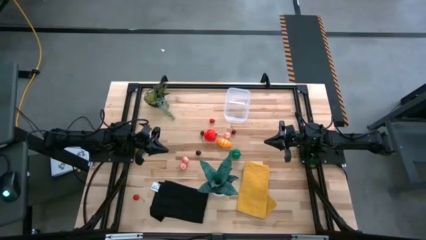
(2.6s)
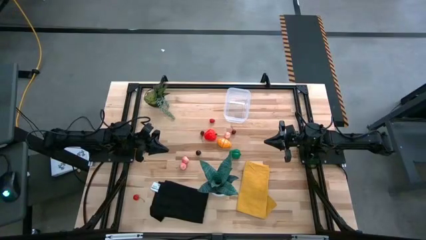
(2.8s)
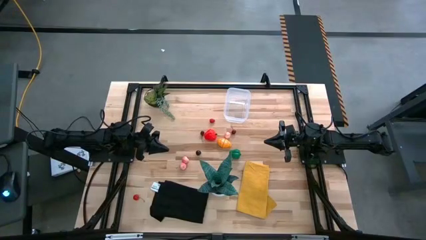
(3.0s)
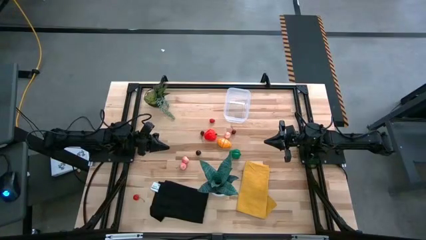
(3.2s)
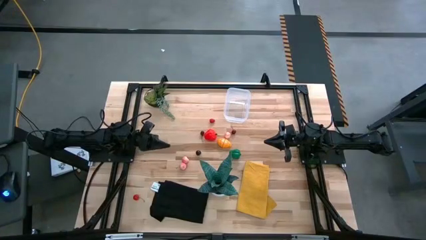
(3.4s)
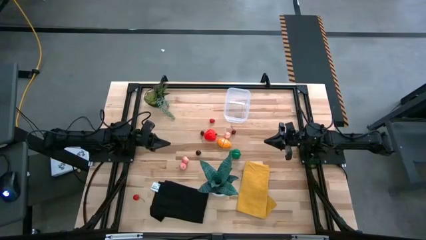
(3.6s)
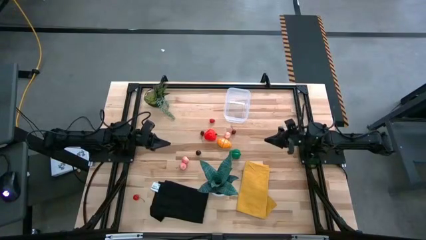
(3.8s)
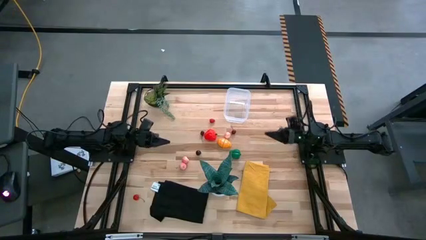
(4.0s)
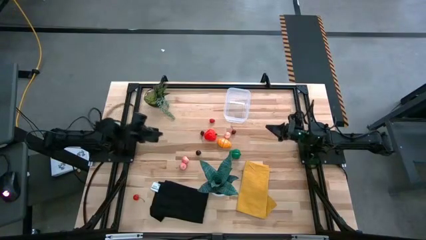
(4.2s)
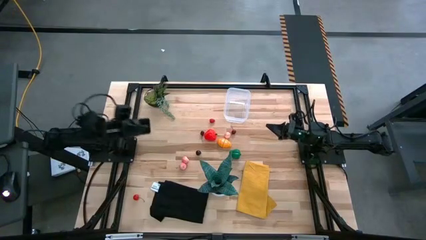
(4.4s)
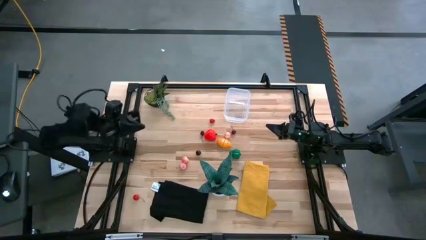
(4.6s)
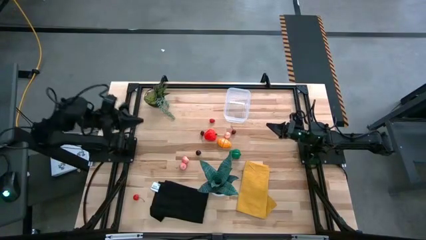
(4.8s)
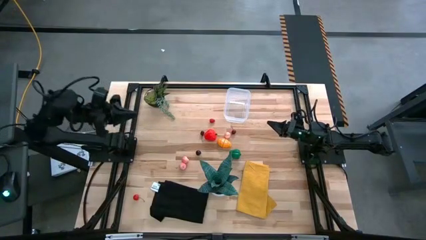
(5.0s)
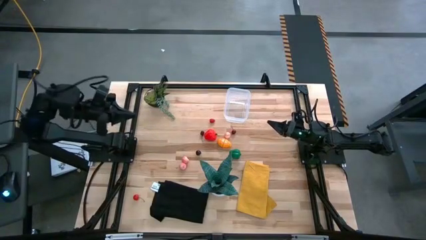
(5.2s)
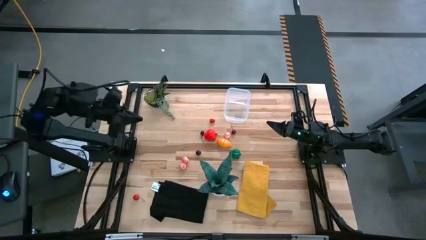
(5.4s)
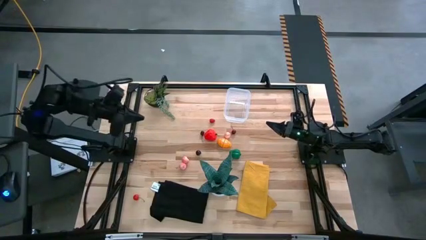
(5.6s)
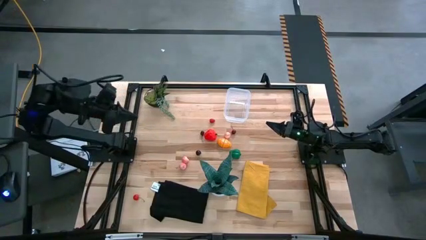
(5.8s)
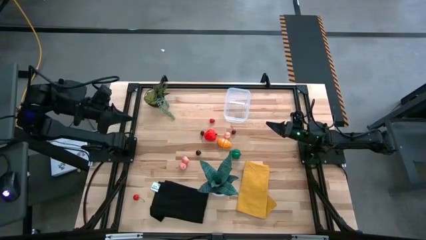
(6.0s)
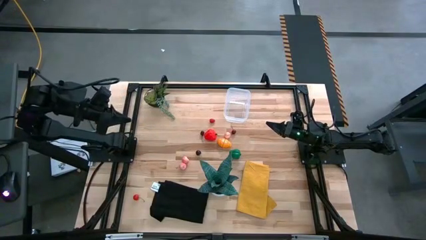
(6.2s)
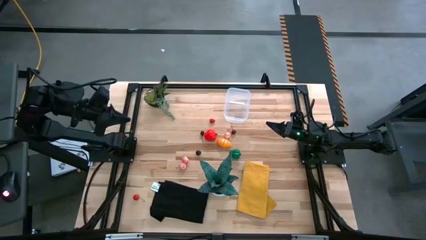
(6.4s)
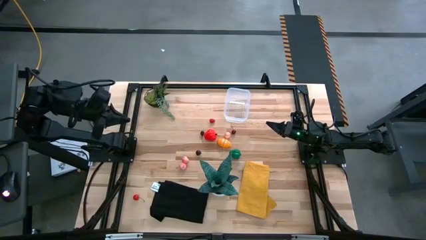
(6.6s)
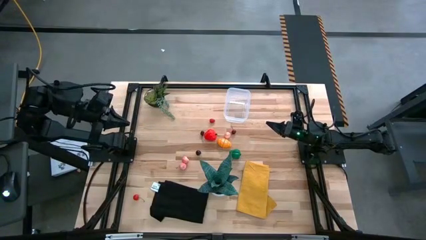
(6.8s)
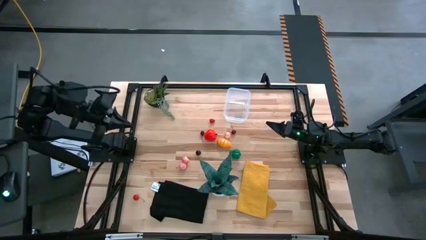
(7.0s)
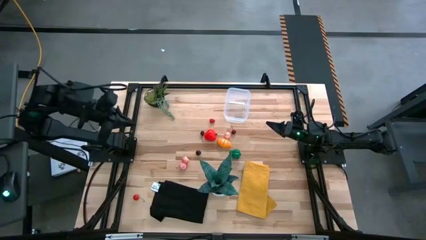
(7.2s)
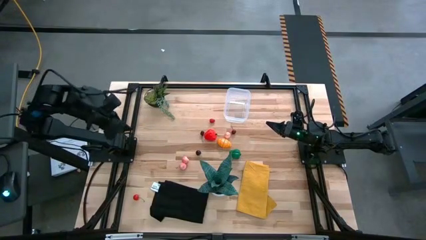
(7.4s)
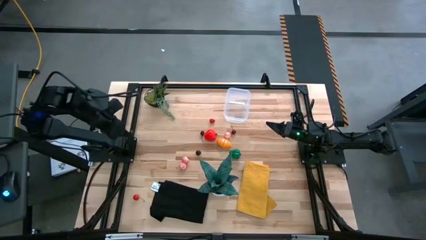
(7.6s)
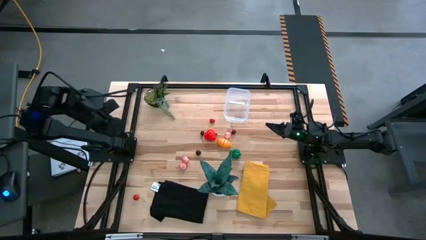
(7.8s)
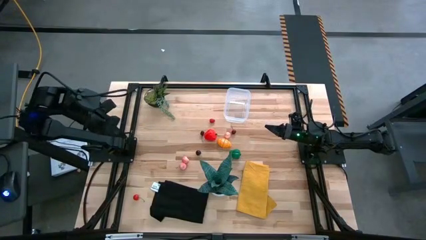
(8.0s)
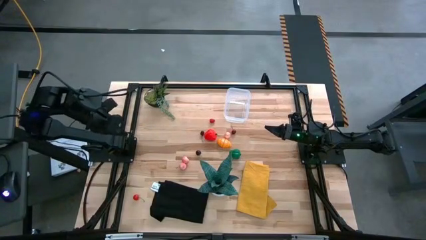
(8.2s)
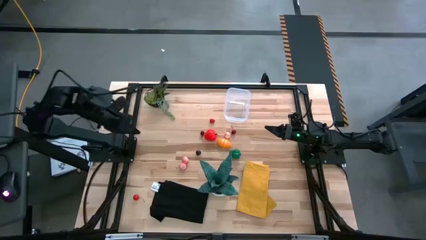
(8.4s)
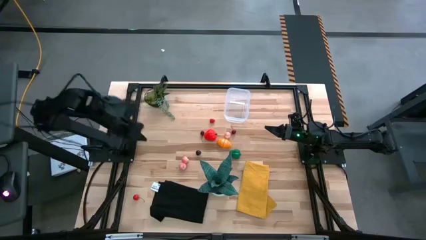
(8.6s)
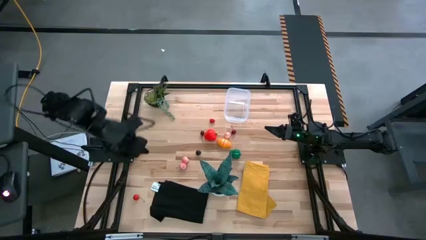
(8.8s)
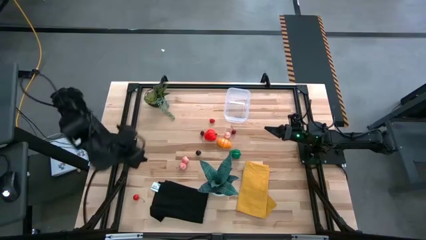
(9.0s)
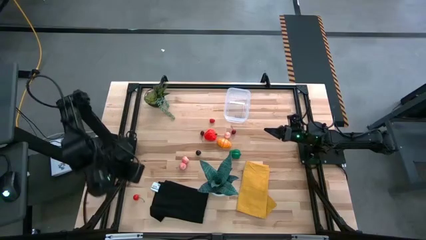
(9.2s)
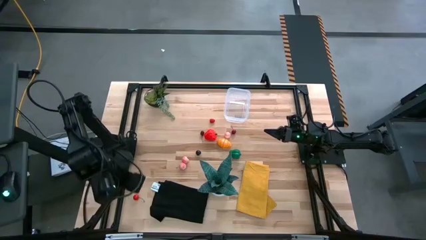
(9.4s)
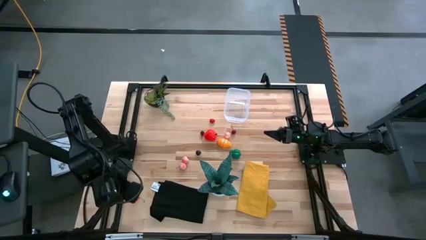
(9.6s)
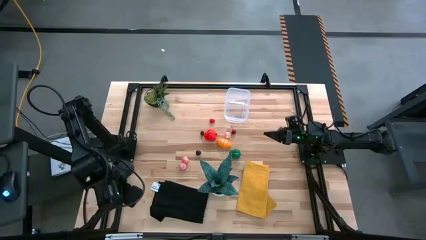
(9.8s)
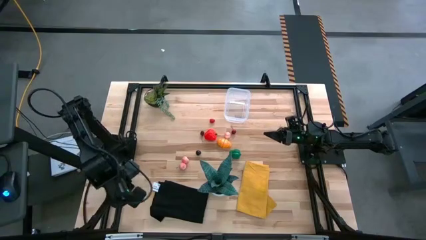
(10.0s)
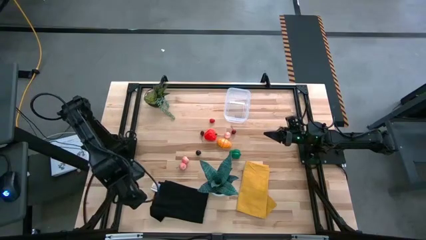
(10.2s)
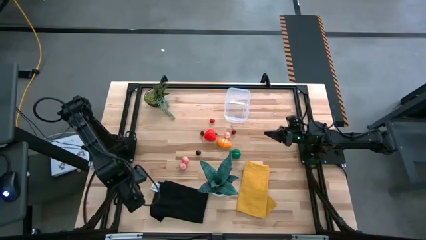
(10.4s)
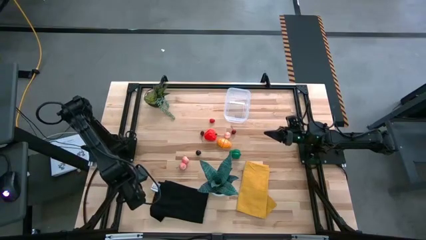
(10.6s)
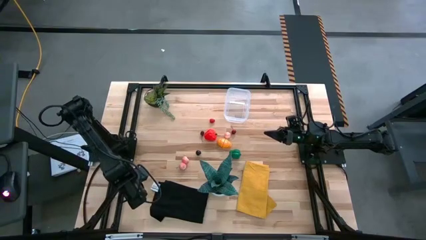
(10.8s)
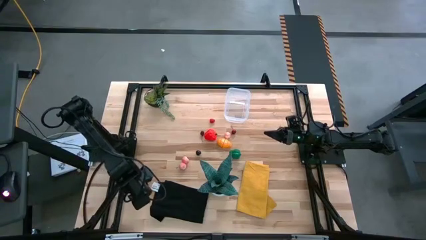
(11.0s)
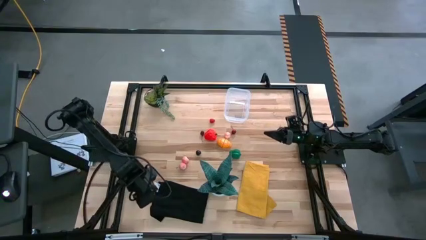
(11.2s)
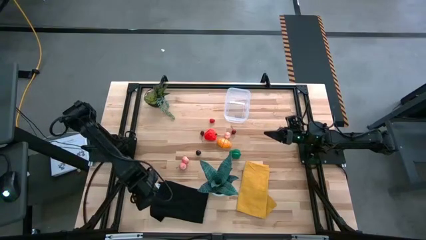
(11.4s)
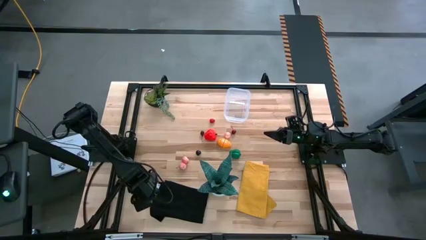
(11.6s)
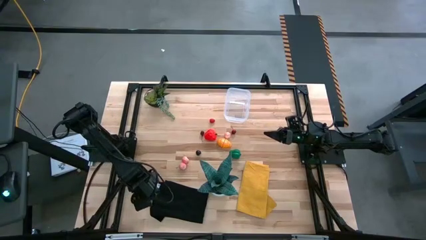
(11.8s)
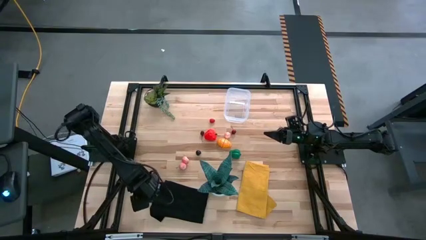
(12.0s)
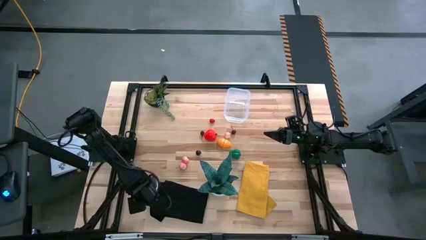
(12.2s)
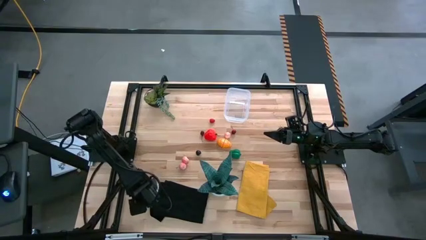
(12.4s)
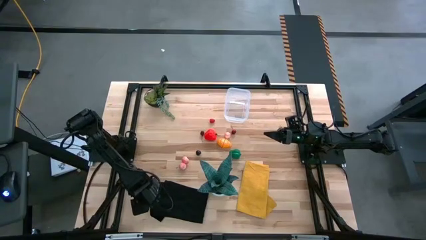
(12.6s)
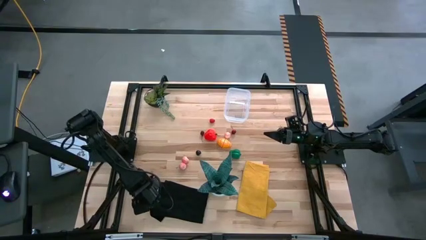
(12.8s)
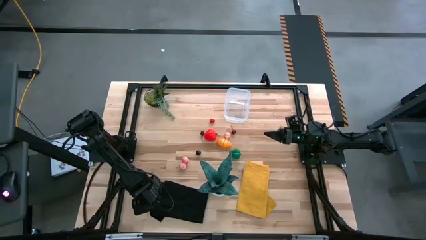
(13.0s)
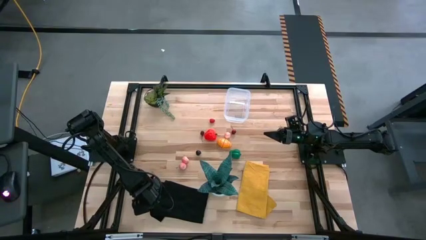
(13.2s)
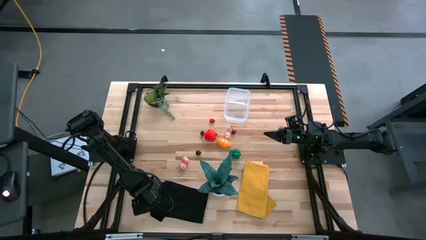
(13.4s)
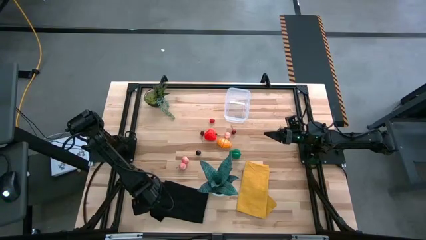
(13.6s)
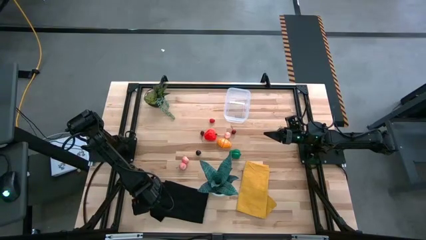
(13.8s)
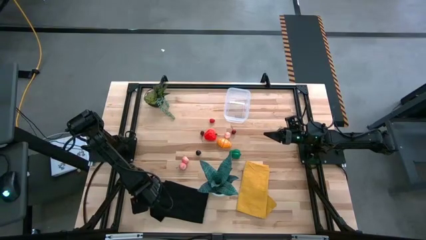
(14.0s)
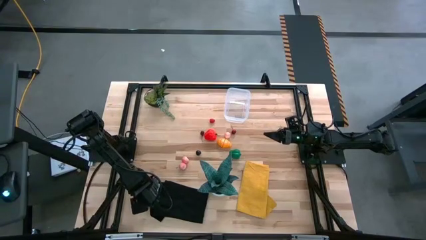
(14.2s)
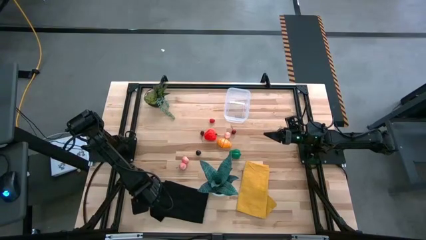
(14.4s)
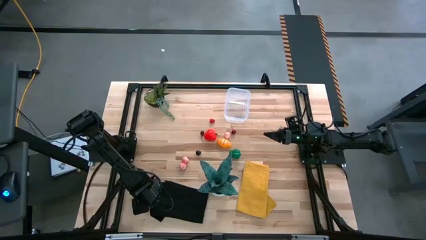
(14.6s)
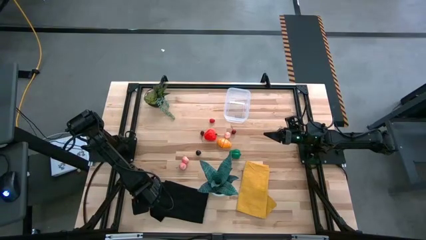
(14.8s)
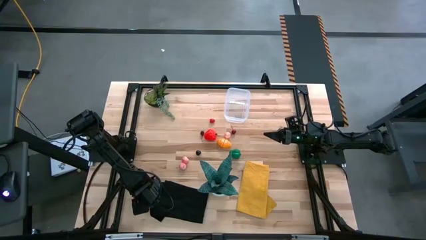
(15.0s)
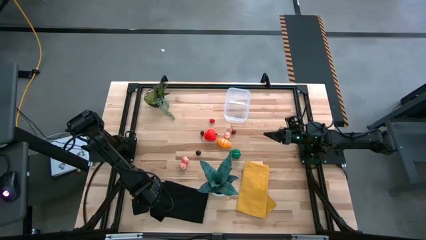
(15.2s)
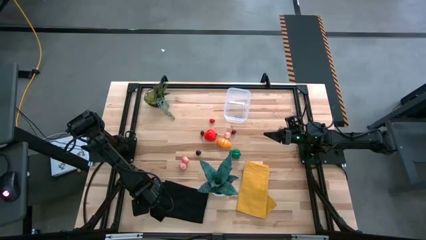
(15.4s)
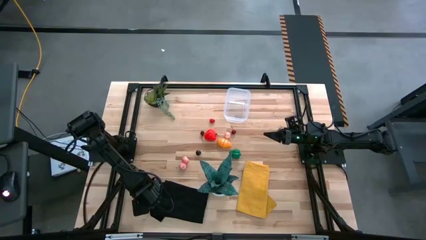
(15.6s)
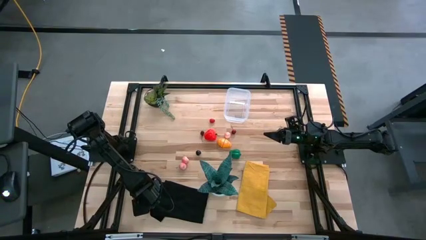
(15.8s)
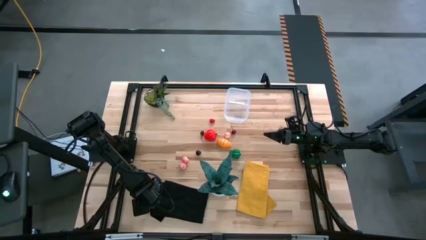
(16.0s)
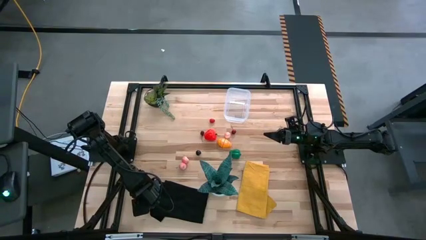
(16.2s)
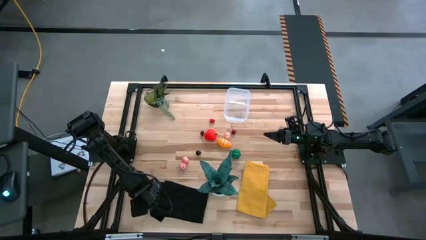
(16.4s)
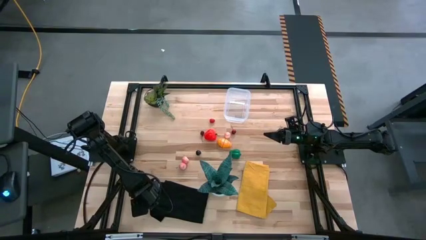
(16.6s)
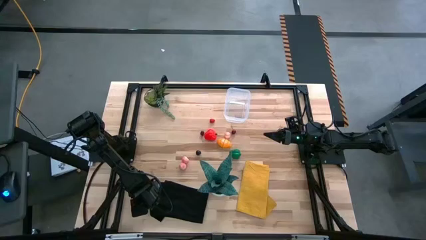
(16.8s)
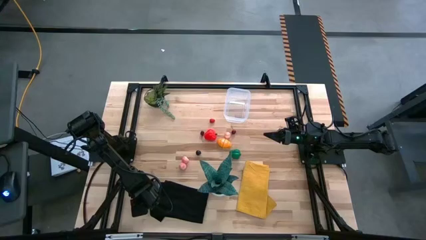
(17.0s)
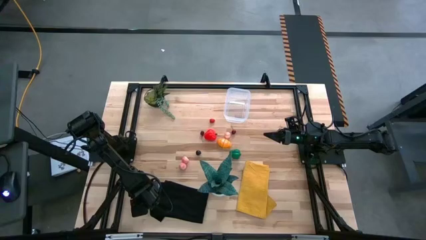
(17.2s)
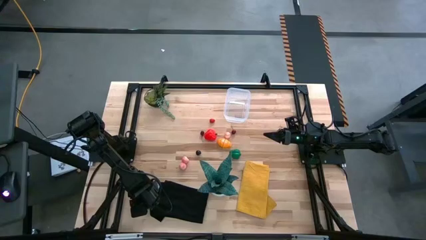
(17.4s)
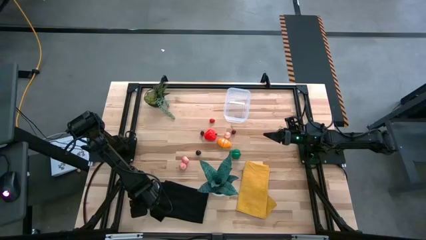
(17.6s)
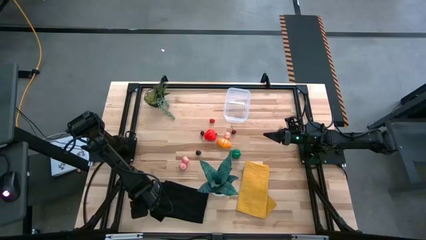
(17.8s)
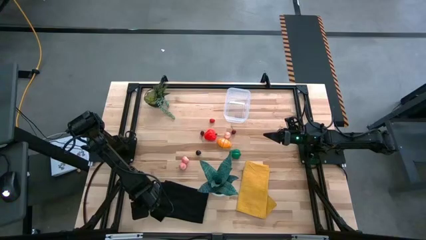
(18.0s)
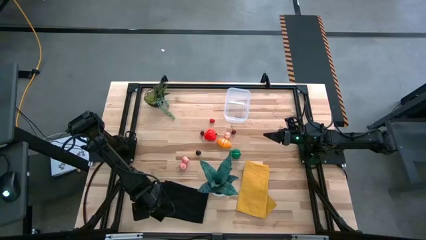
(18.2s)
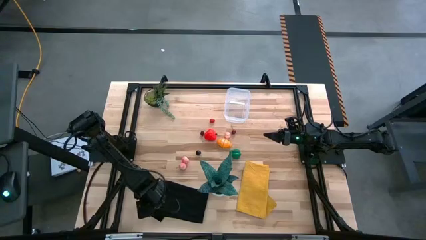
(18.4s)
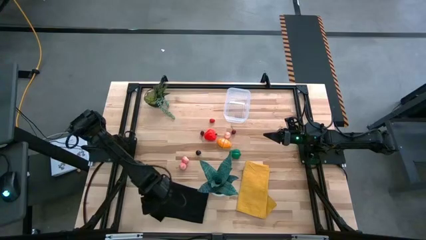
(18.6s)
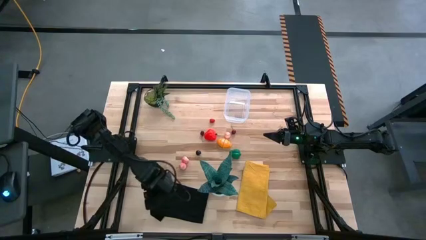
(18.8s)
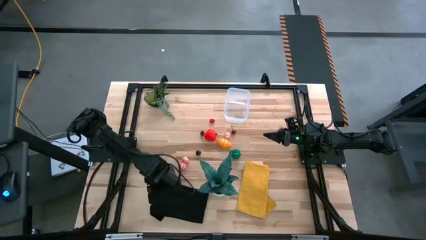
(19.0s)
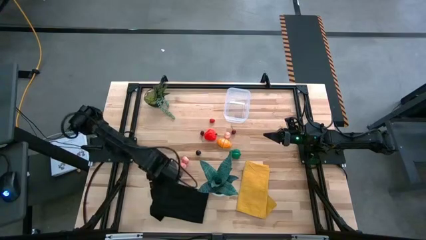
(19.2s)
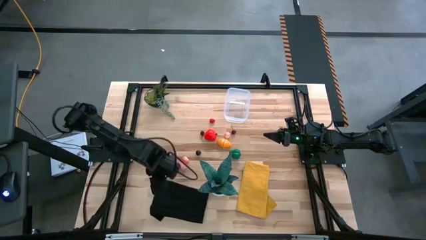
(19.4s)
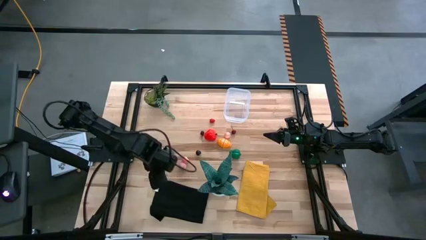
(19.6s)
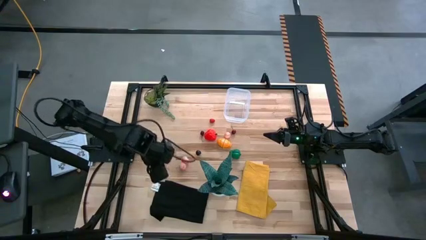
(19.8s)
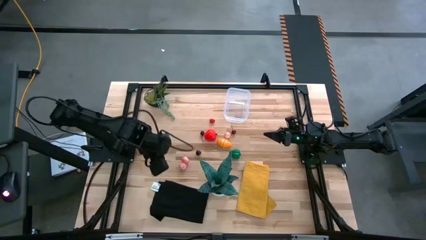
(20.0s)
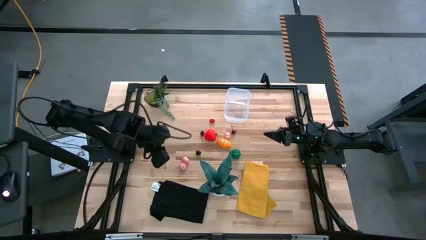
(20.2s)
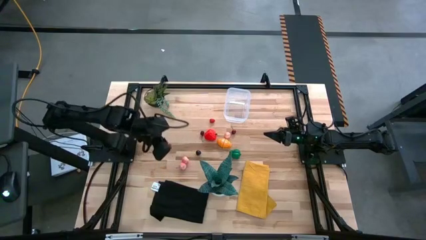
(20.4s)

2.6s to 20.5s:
Task: Pick and placing Produce into tupperware
Put the bottom red cherry into the transparent container
